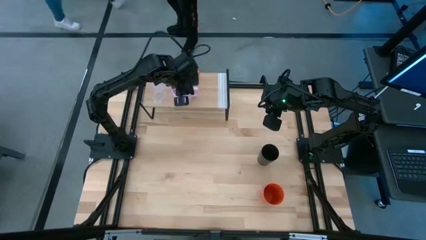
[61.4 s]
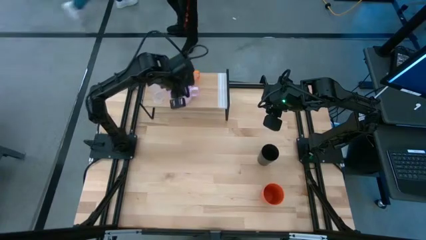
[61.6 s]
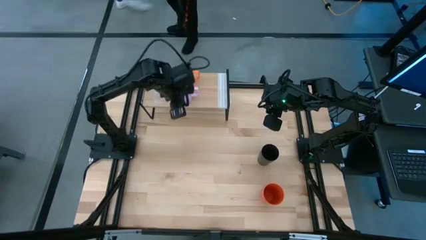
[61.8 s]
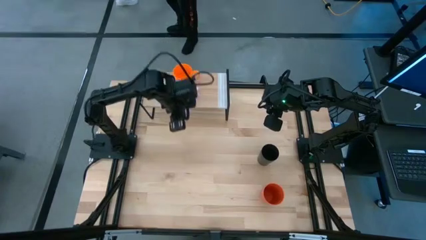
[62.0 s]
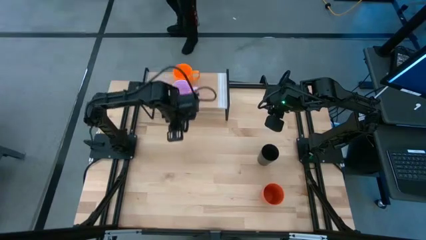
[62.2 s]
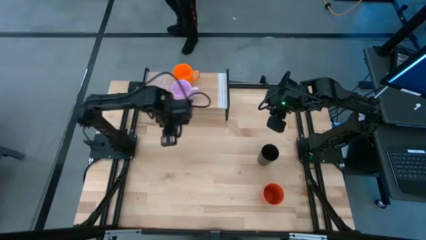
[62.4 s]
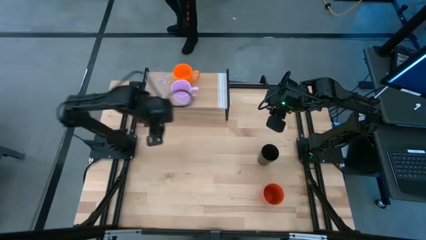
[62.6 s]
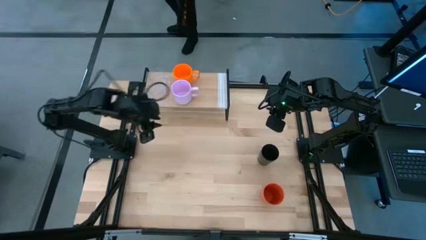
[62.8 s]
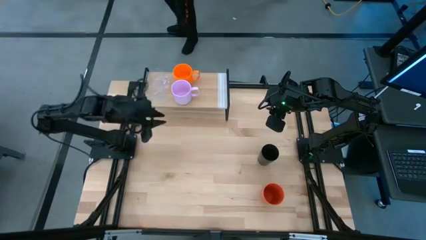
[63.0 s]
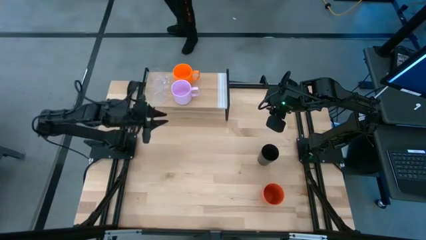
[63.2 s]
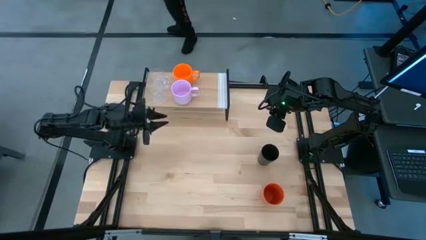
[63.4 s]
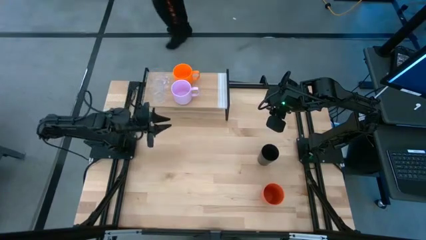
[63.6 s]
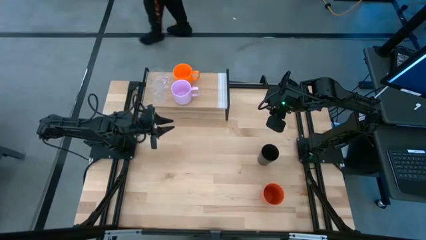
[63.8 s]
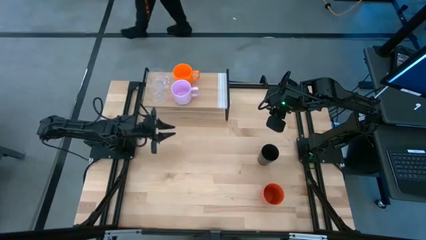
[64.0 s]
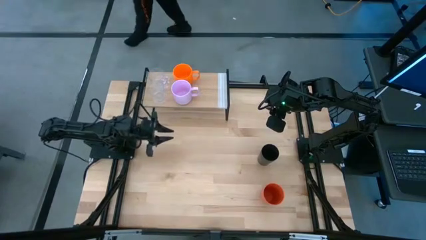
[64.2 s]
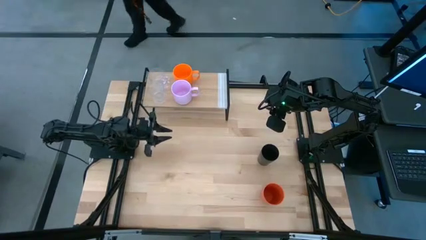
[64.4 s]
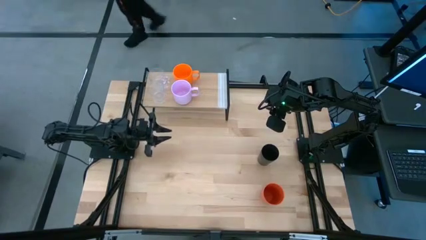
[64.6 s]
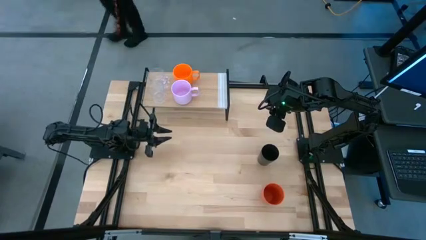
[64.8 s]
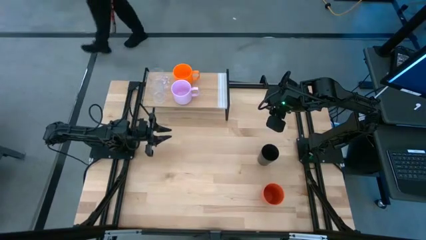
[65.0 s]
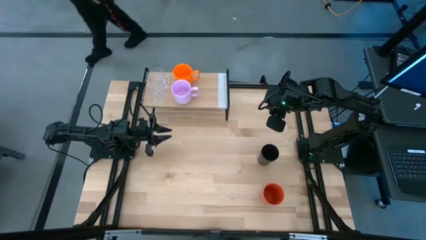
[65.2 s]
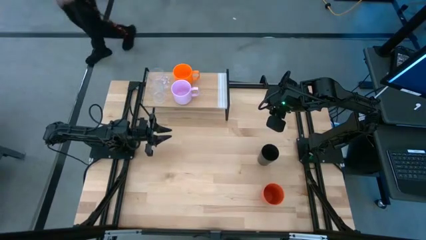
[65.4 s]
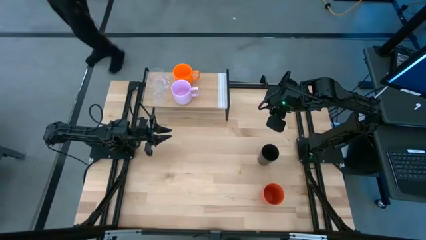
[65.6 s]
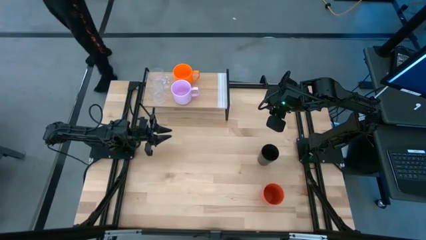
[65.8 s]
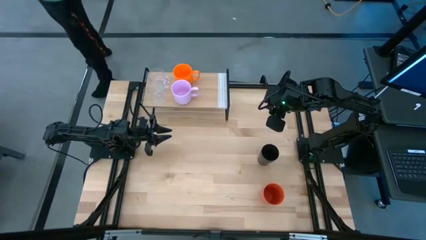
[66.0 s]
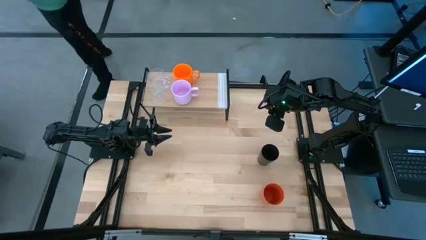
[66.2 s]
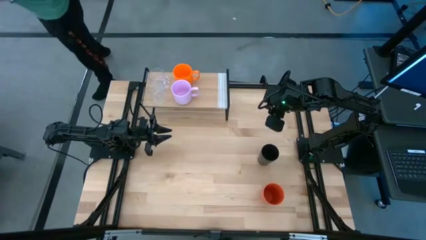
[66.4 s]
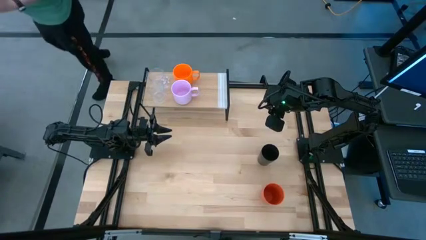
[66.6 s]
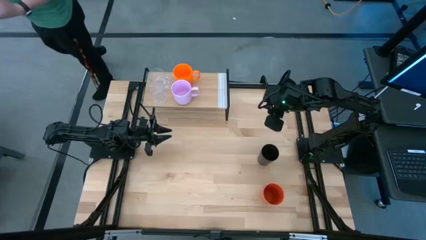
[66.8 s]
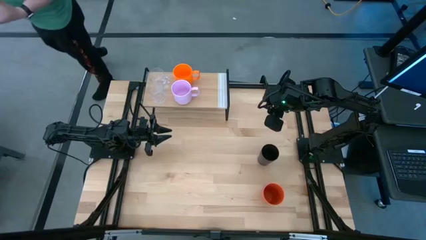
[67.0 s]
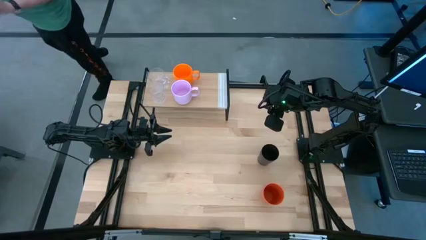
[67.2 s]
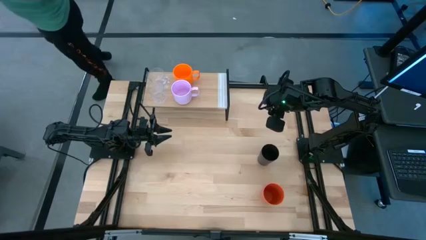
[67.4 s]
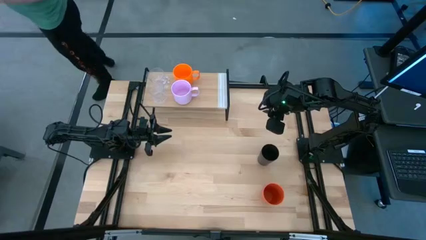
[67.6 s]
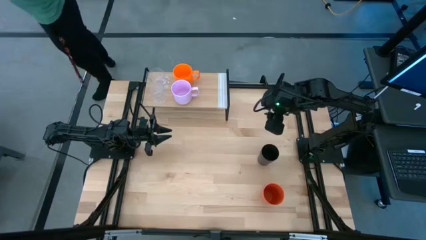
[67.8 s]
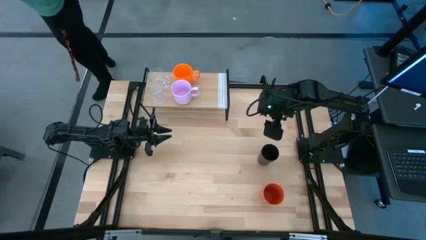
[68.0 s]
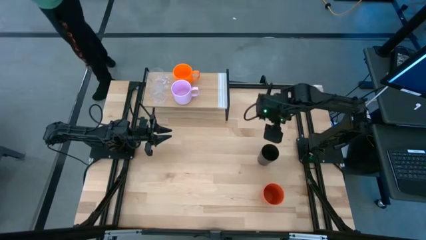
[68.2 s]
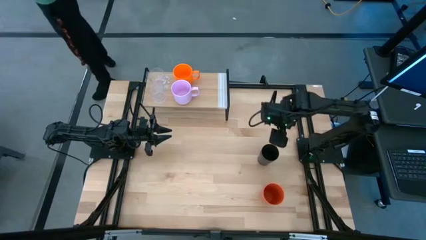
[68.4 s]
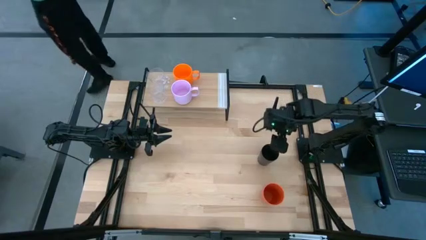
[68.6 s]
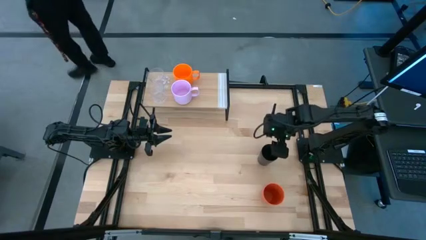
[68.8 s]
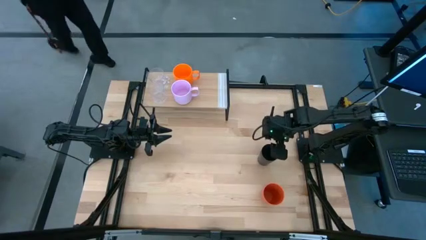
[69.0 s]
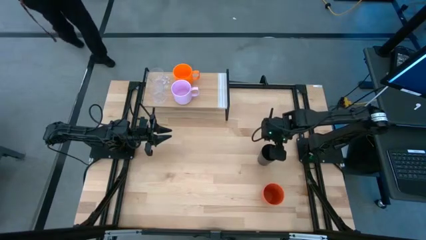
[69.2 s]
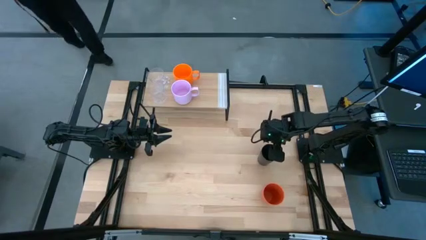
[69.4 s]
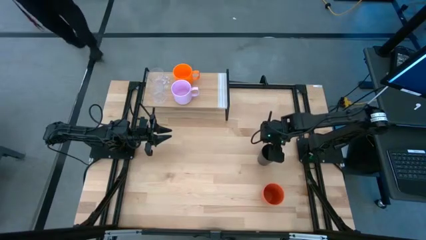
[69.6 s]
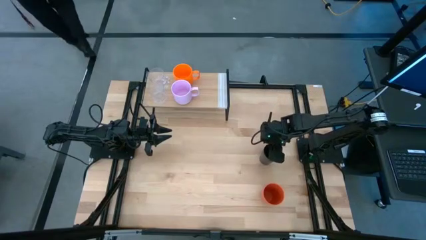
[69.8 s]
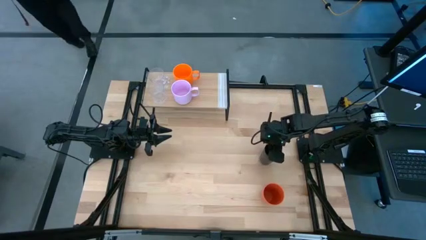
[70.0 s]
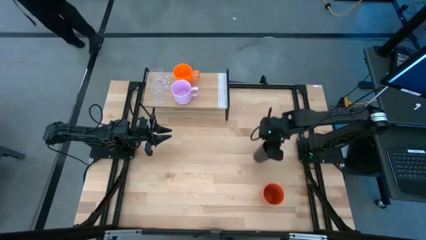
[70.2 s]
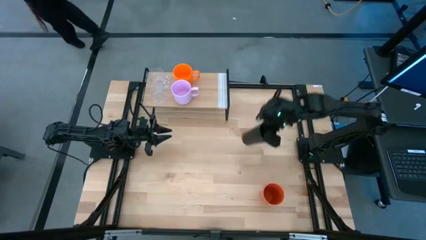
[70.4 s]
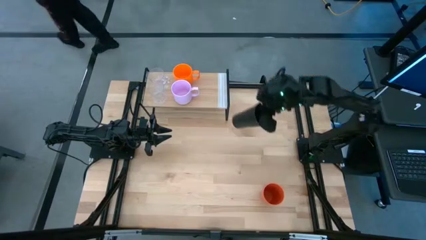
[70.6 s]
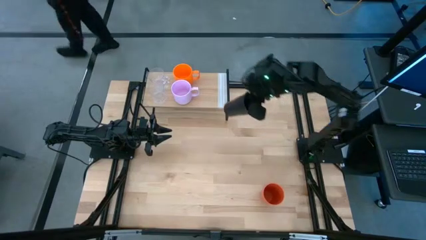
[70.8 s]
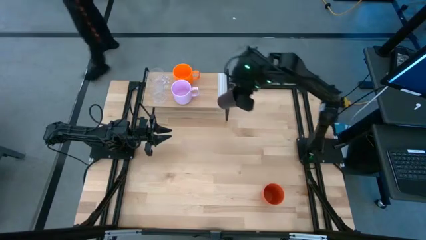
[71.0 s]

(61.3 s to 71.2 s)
Task: Stack small to large cups/mugs on shelf
Put the black cup on the shelf

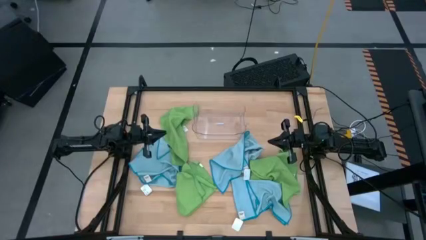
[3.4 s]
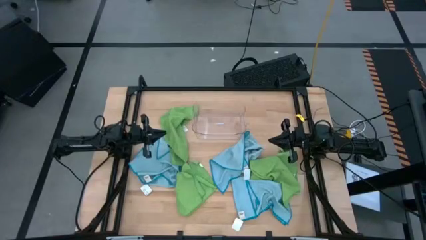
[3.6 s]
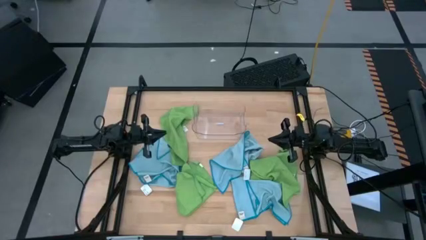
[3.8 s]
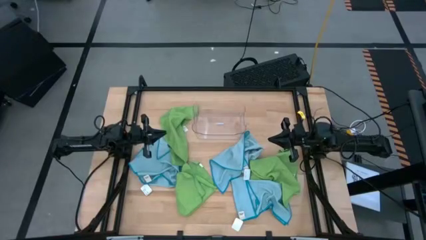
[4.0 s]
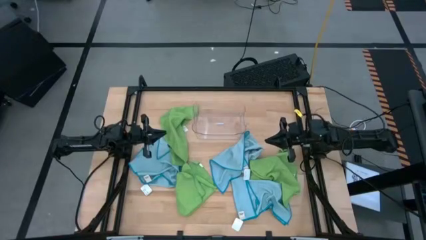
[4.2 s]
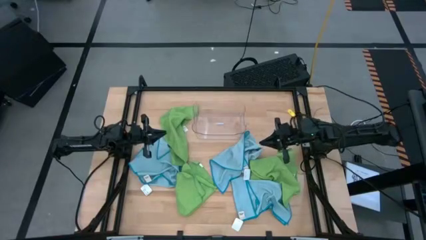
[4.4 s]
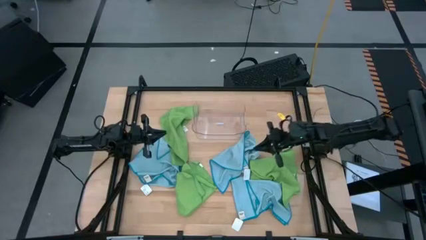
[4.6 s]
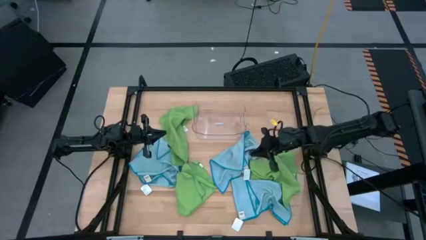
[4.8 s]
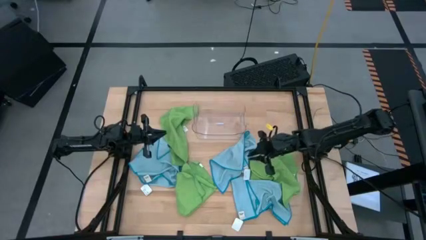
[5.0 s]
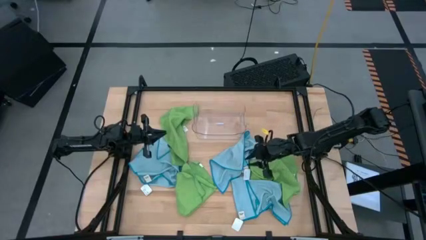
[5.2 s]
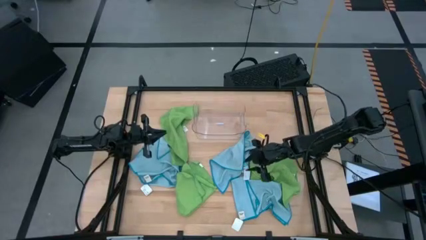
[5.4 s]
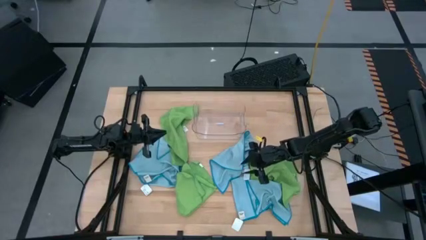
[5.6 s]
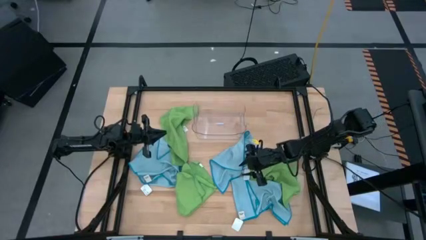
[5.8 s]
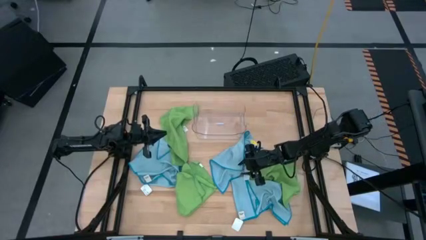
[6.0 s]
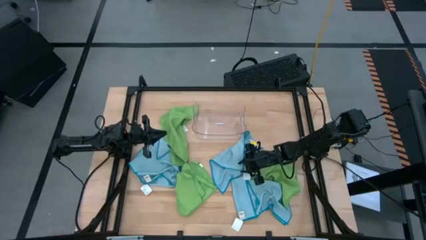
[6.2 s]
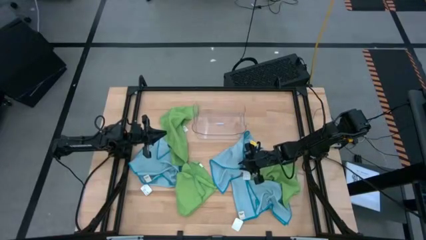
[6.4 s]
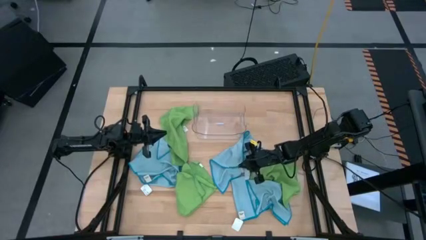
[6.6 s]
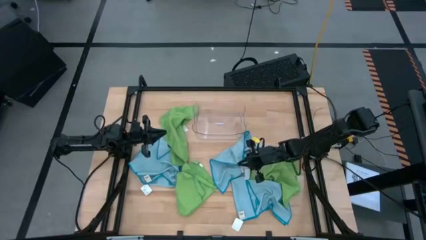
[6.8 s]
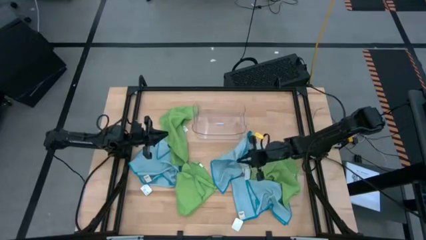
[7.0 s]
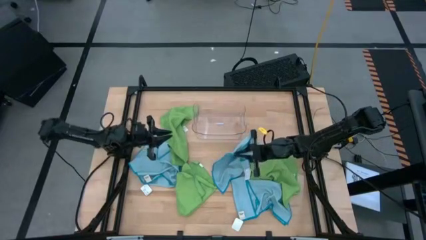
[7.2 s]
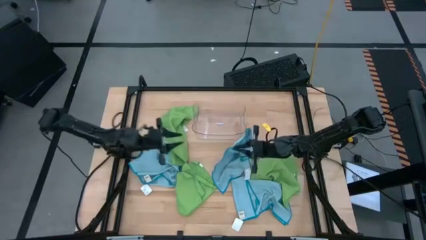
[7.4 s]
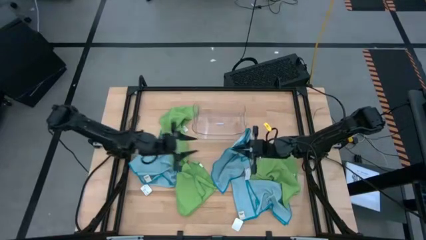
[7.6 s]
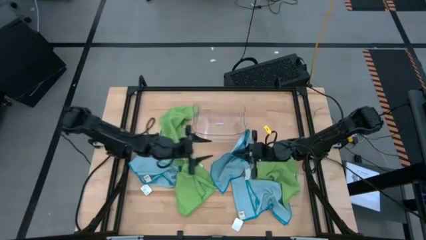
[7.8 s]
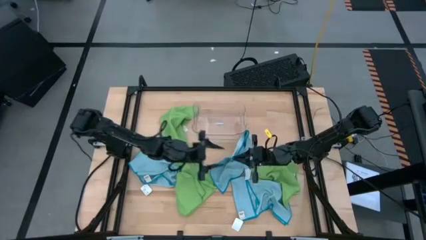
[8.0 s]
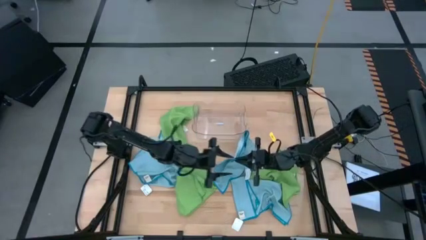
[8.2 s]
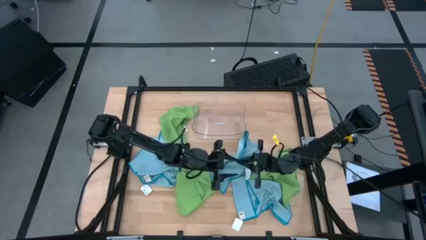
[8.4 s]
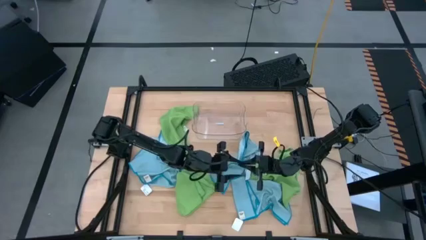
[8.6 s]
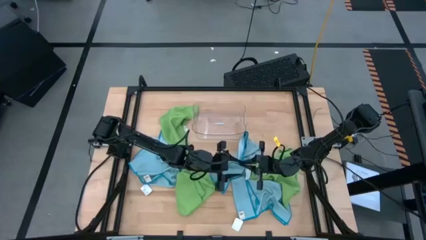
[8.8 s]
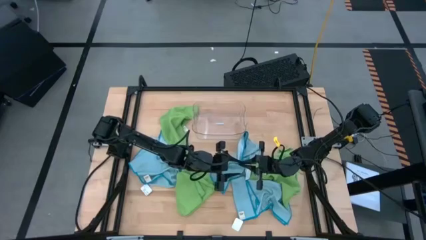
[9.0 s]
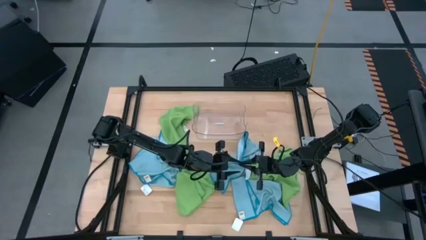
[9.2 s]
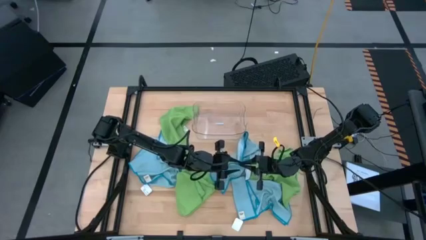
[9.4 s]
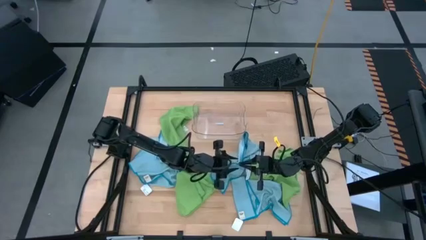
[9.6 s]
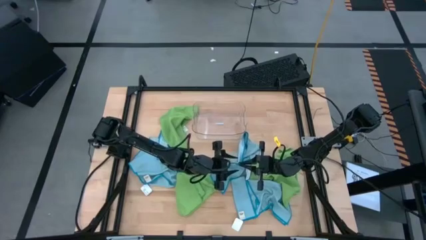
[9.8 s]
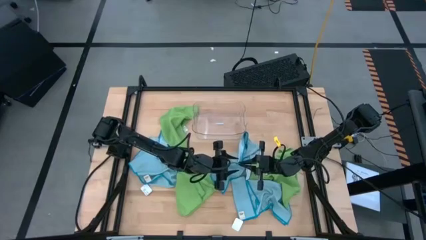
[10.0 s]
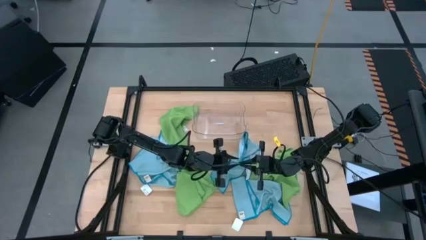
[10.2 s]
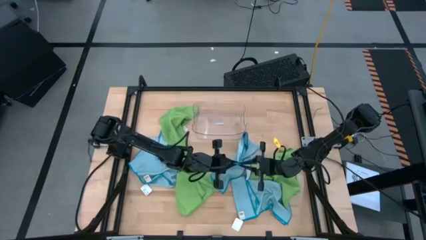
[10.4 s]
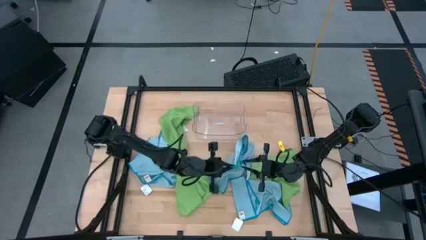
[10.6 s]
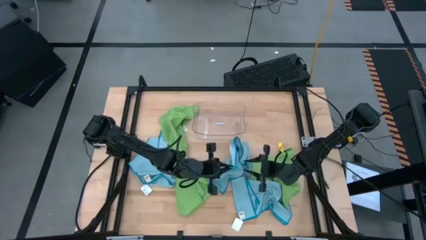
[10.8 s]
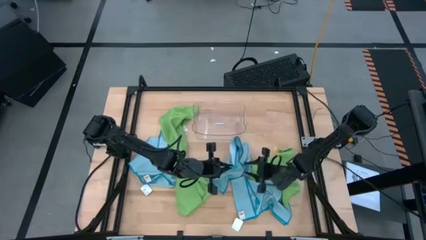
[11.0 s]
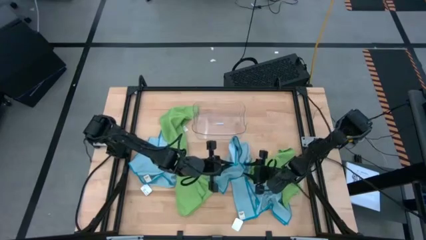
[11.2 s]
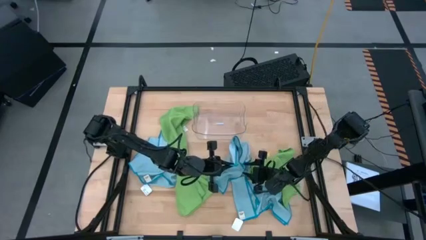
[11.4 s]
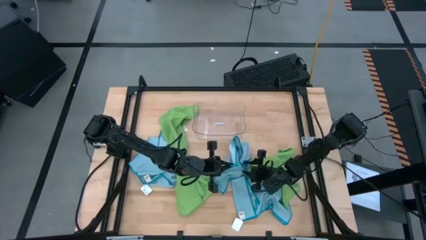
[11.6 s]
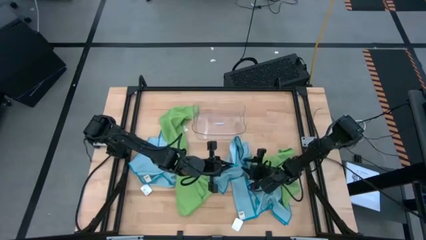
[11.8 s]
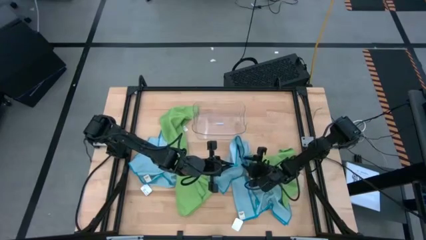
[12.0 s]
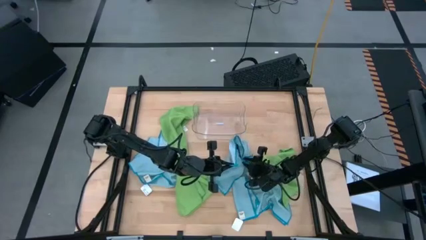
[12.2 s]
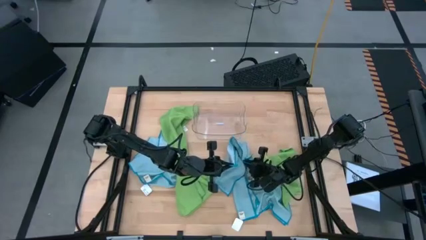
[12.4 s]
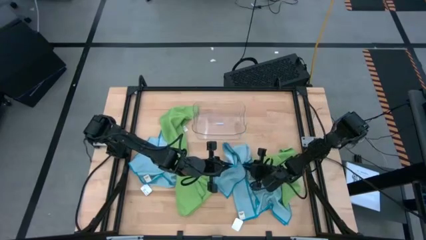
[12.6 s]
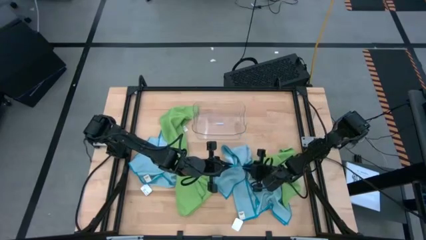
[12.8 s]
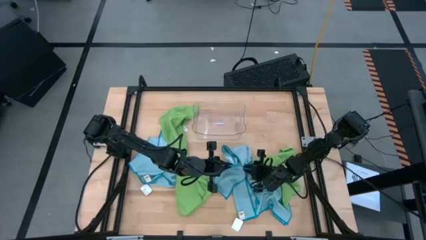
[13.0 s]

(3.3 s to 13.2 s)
Task: Fold microfiber towels
Fold the top right blue microfiber cloth
